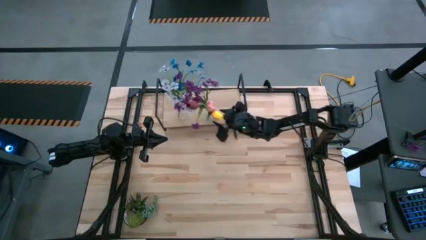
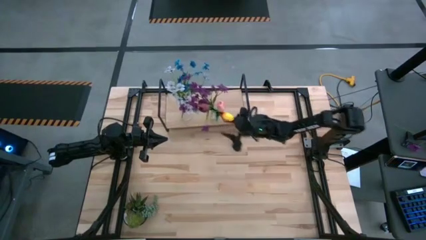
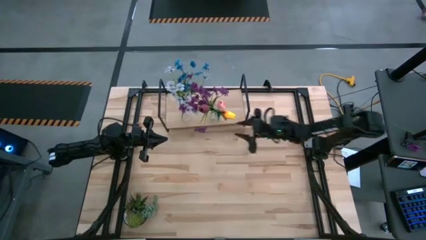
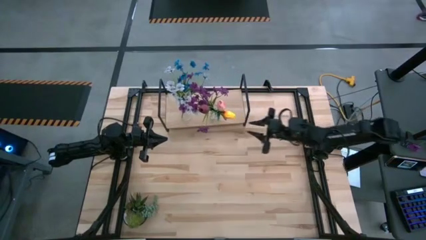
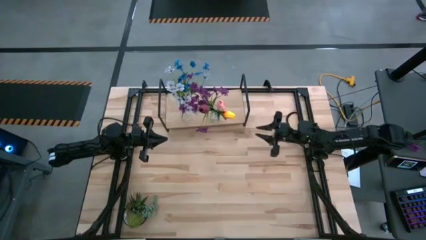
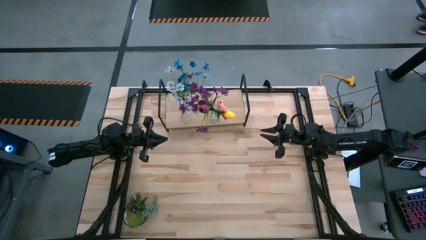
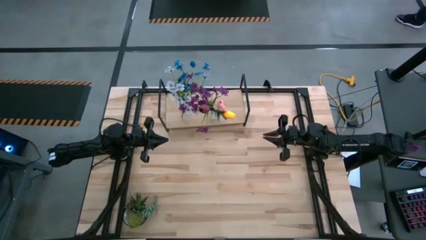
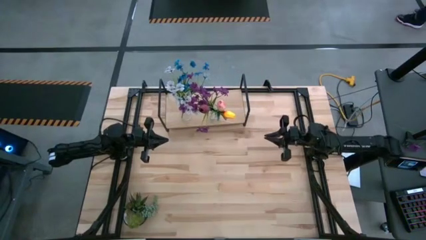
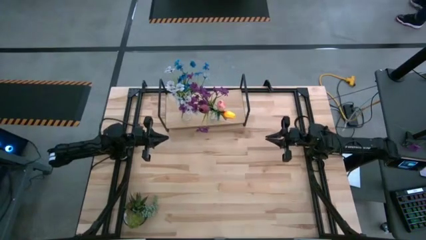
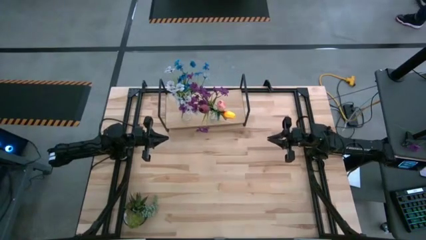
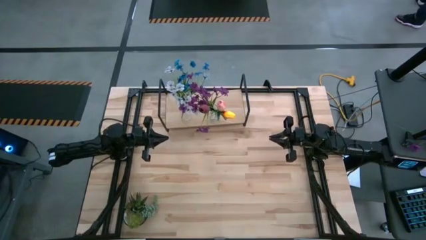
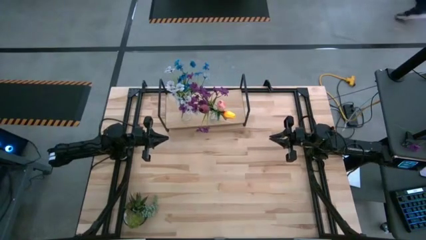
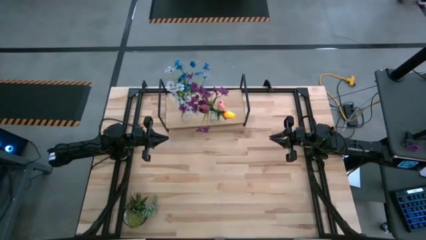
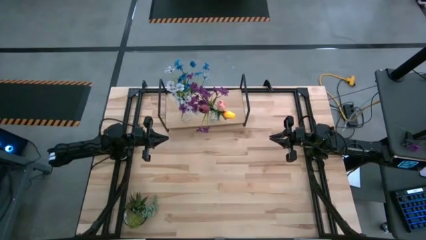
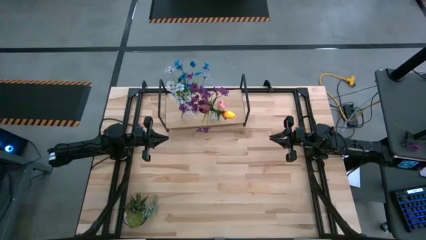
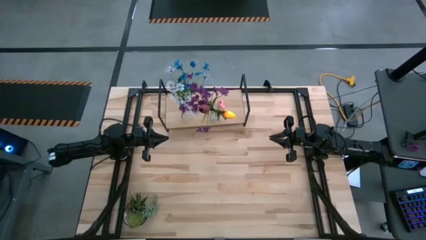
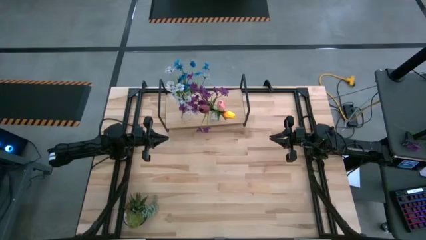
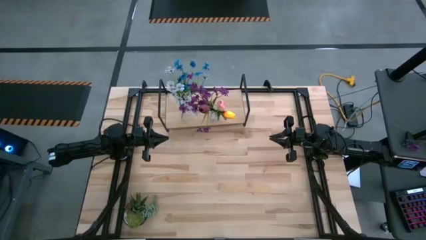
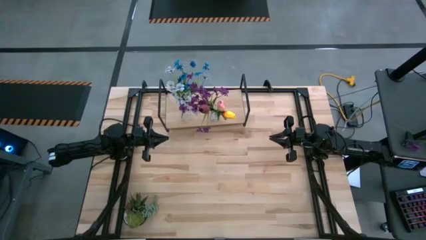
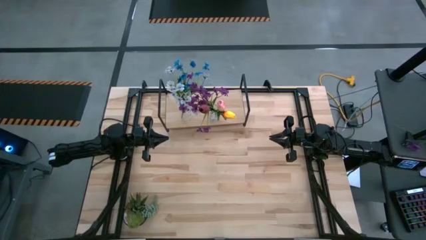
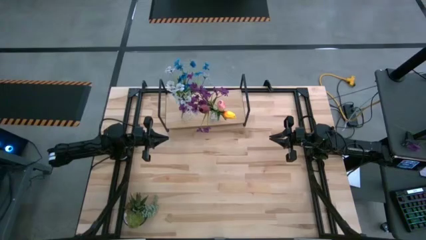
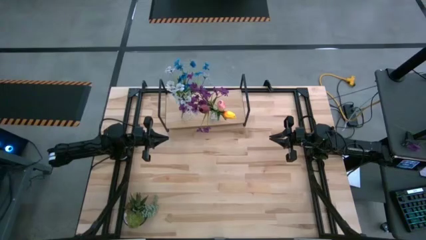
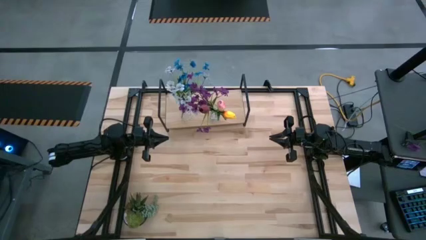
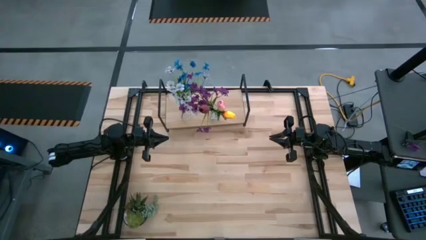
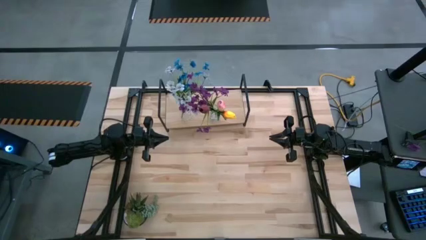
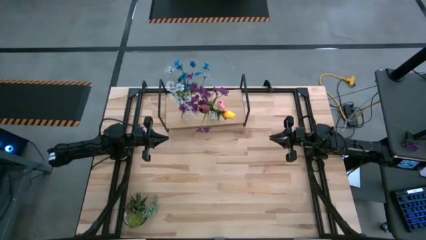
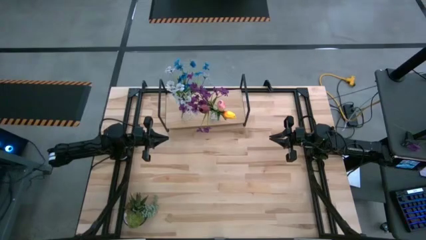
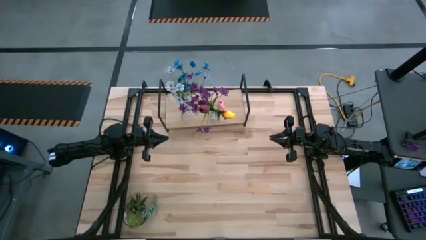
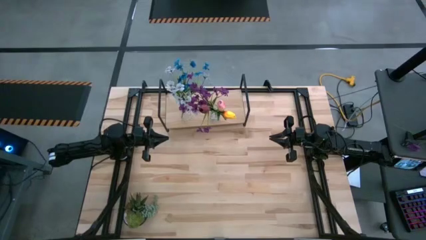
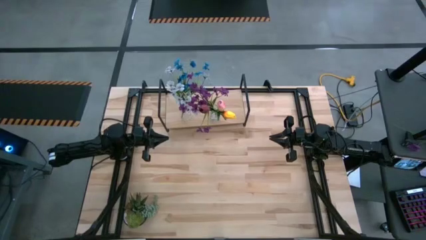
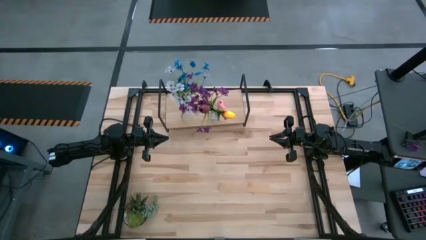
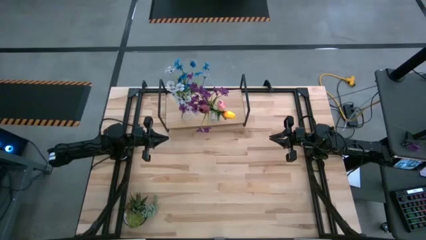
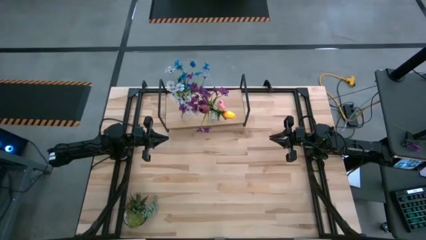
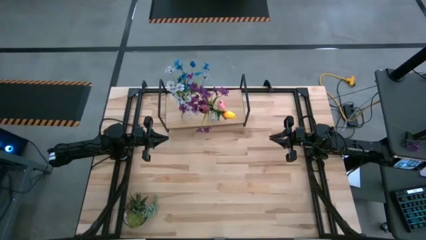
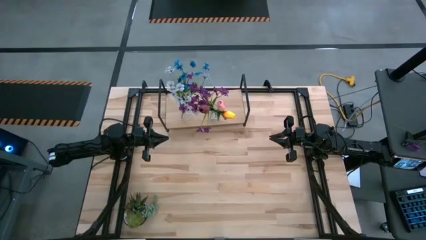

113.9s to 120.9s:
Task: Pick and place flowers into a vace then onto a shelf
Return to Home Position

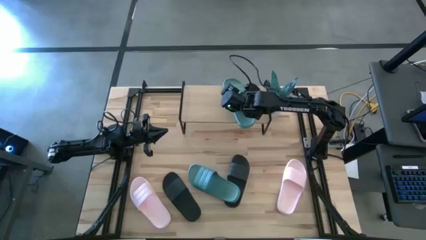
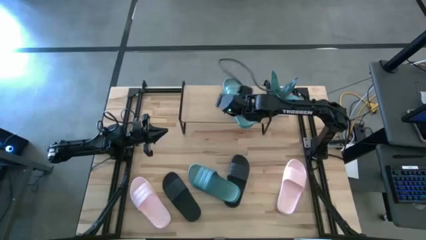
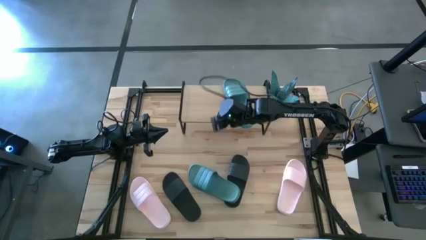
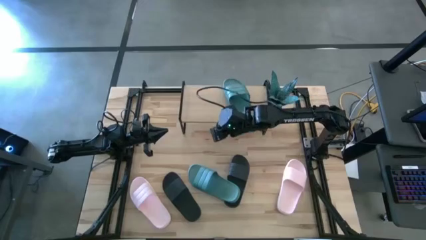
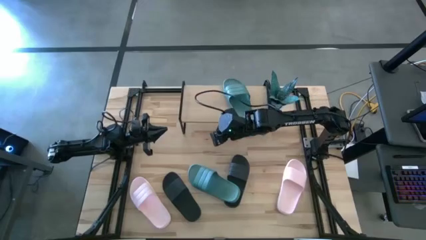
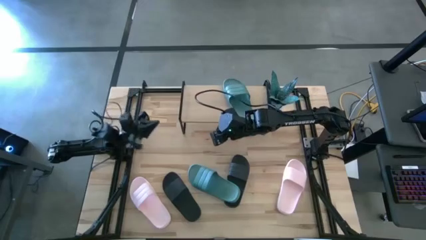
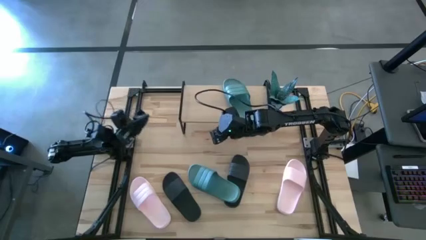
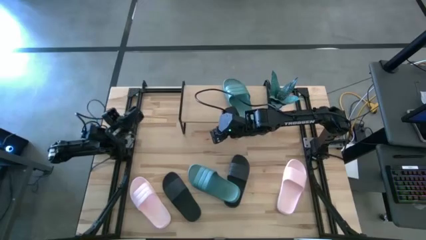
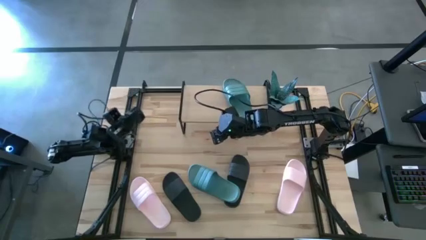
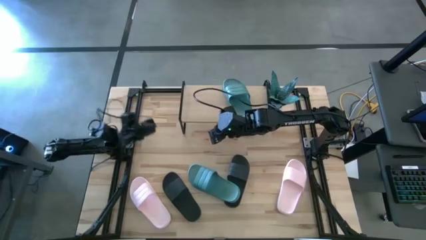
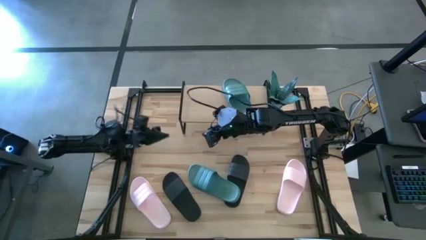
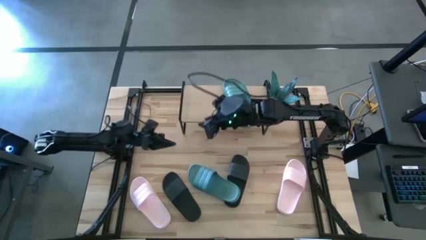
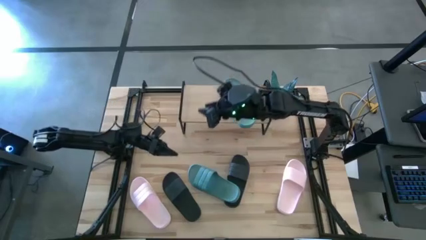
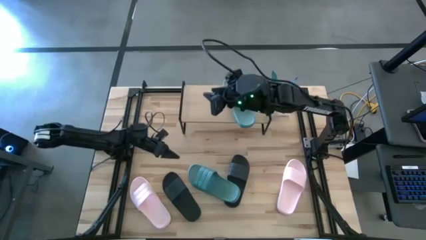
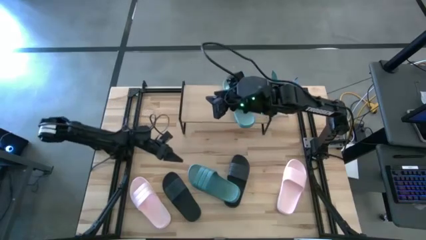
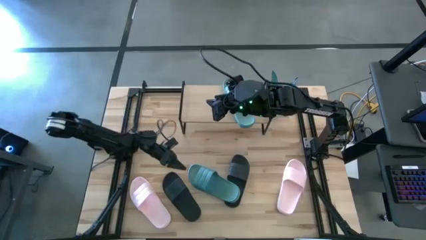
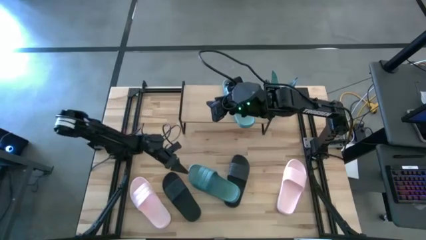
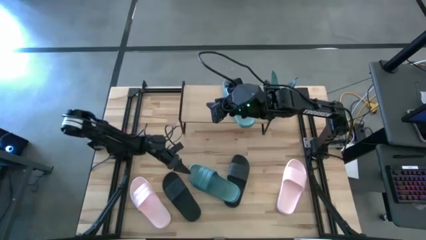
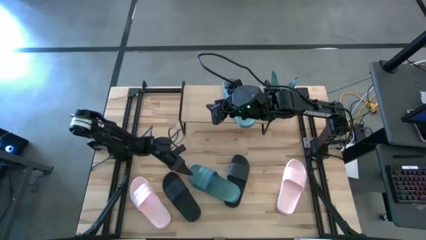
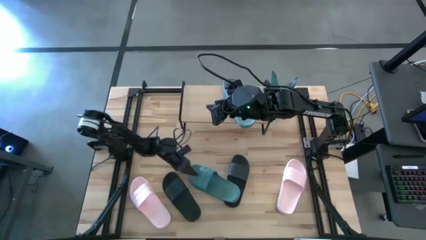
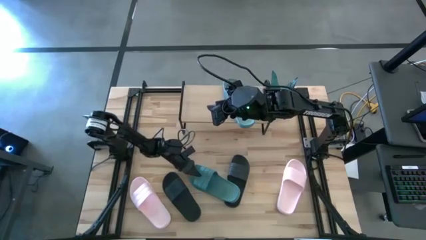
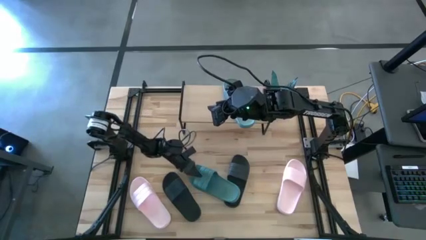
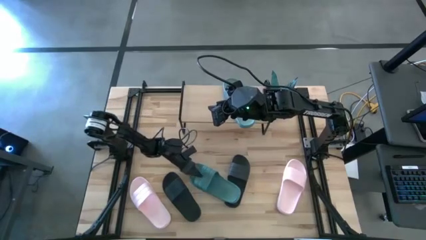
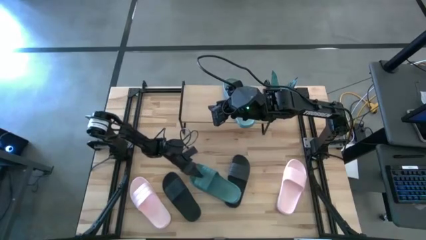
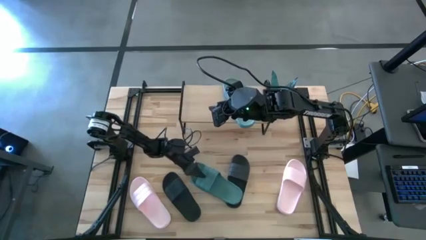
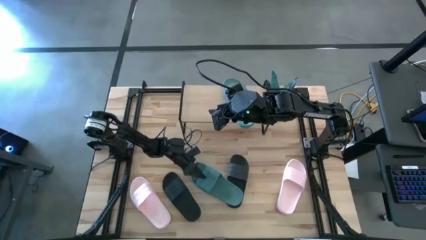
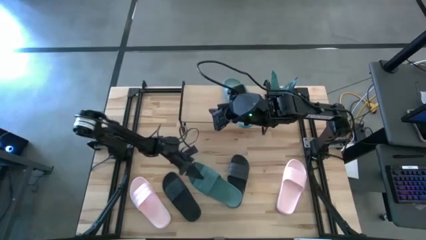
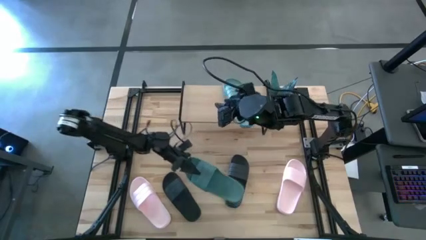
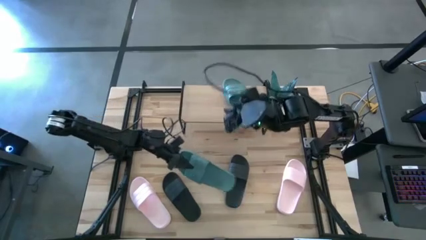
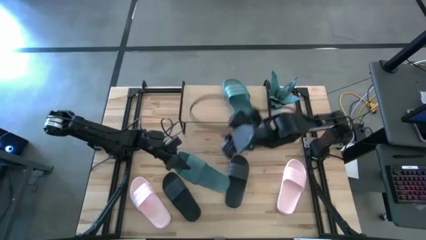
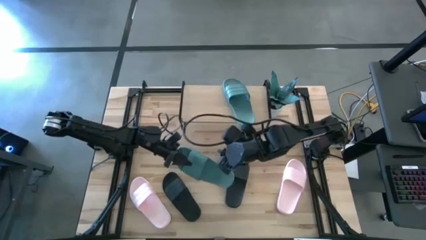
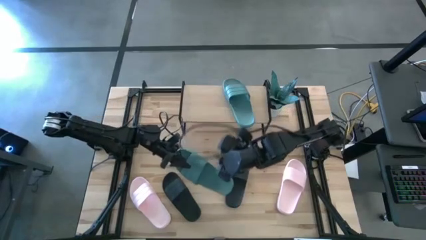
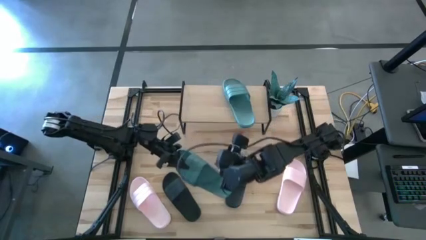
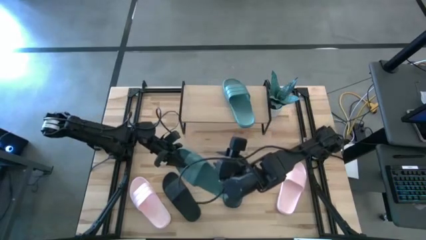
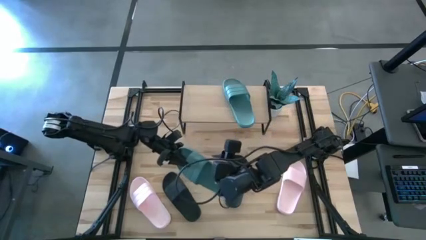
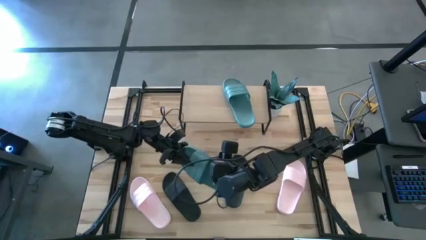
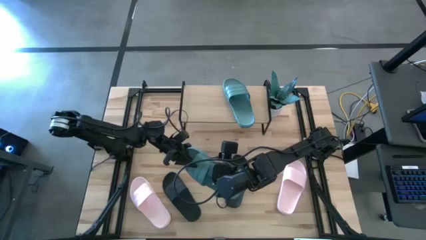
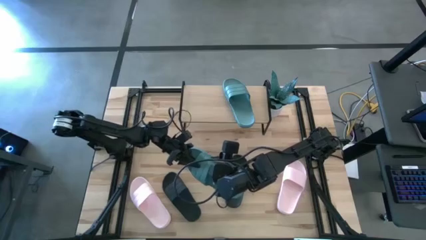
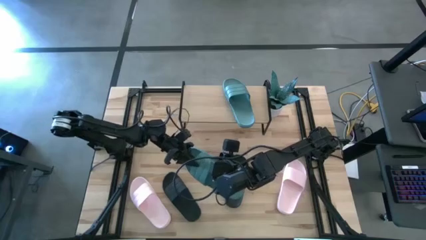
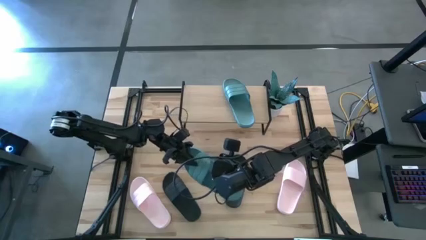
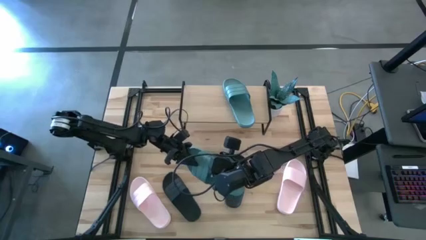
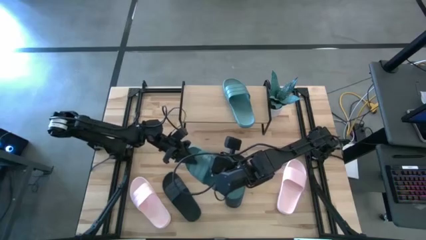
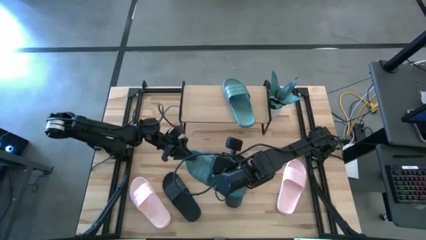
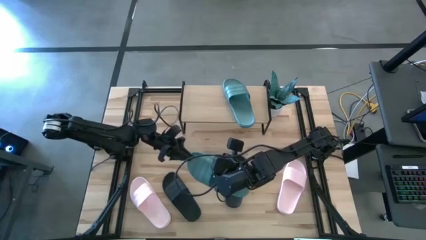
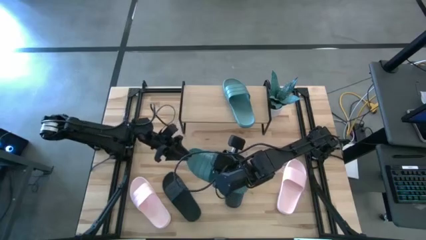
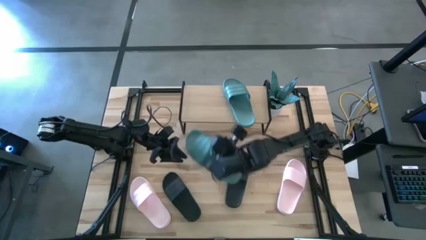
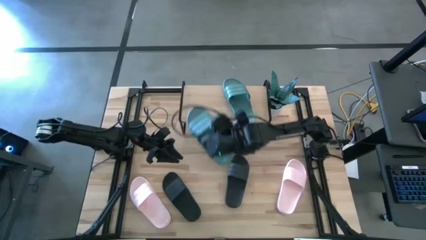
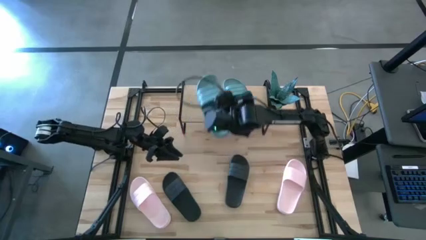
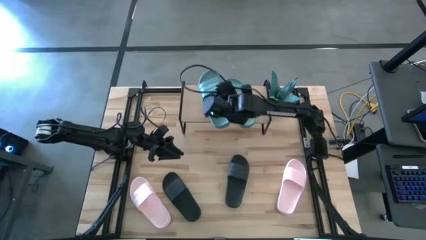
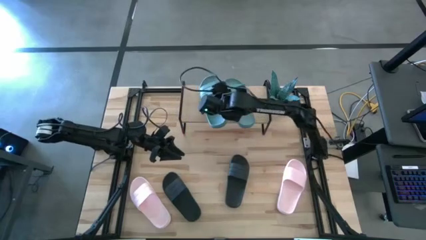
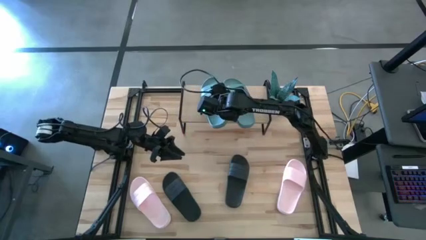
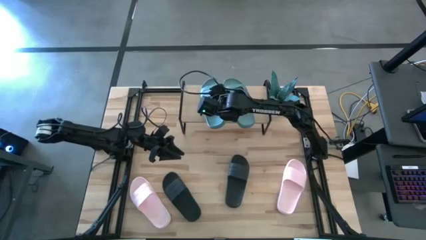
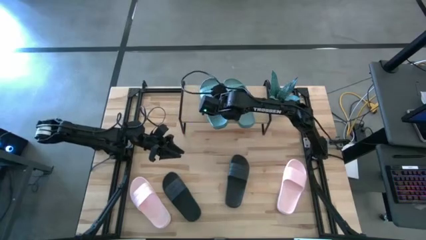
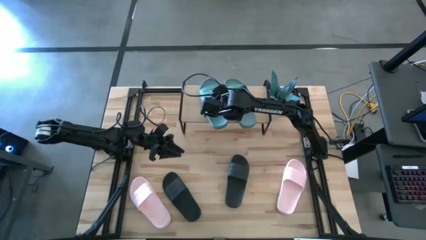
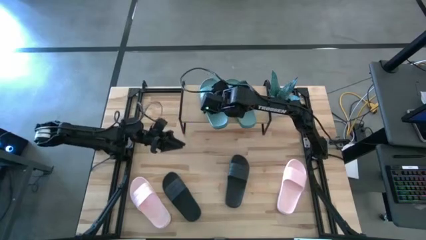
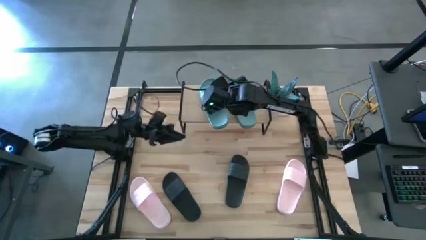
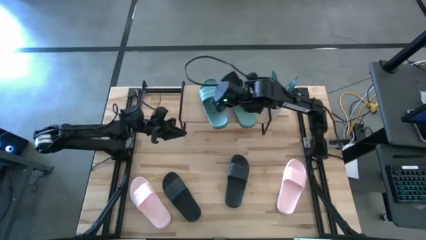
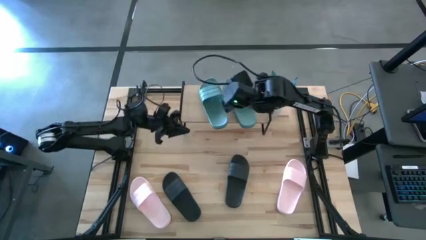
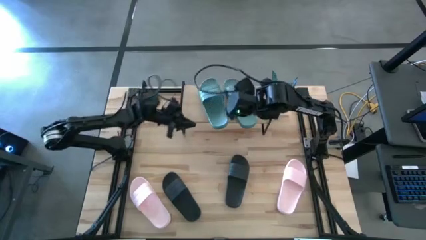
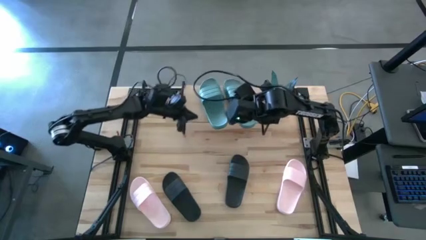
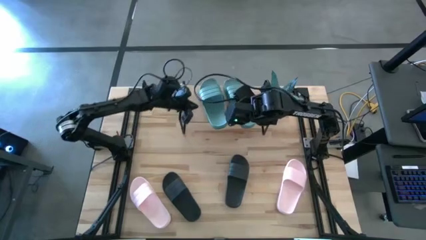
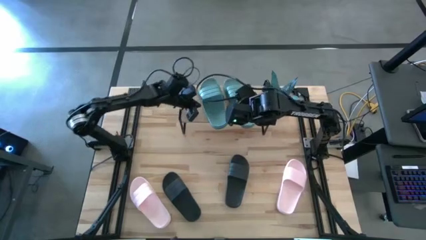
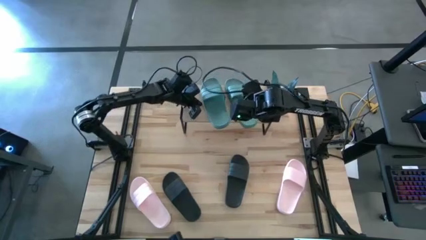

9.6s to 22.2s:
Task: Pick and place slides into the shelf
Put the green slide on the shelf
